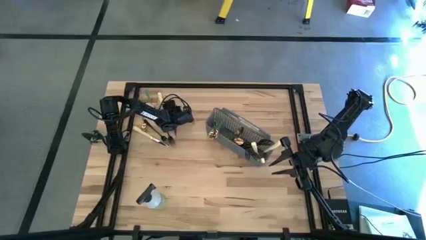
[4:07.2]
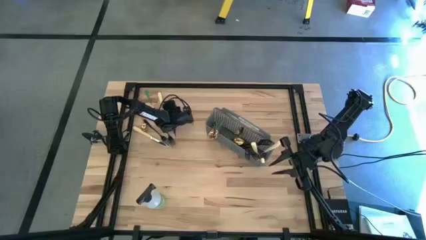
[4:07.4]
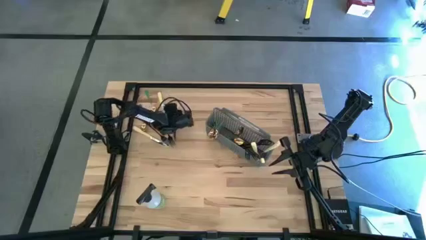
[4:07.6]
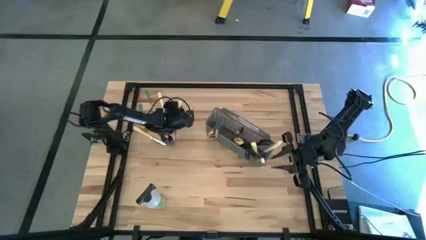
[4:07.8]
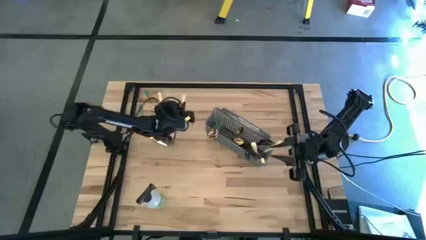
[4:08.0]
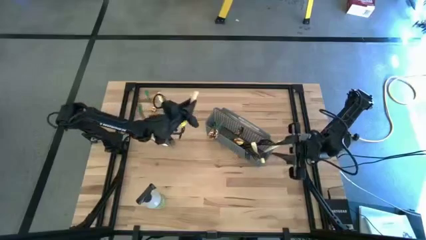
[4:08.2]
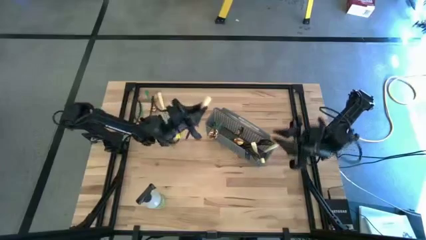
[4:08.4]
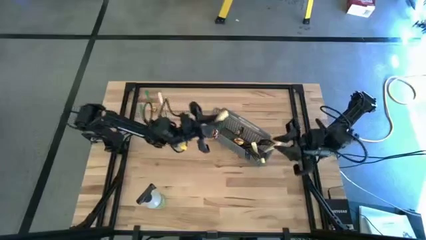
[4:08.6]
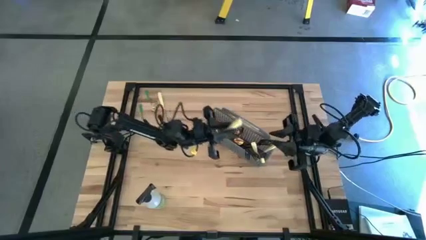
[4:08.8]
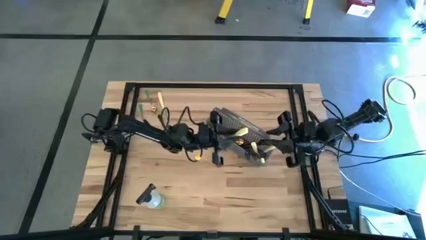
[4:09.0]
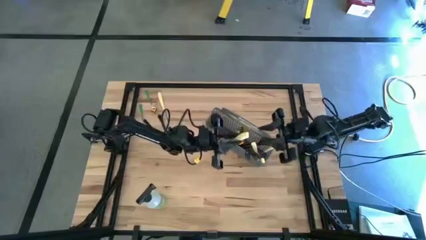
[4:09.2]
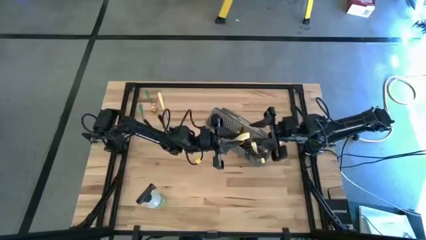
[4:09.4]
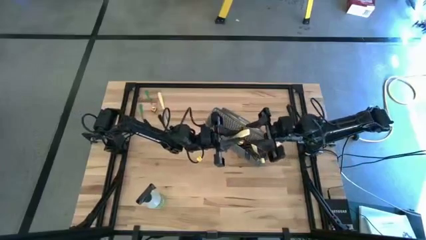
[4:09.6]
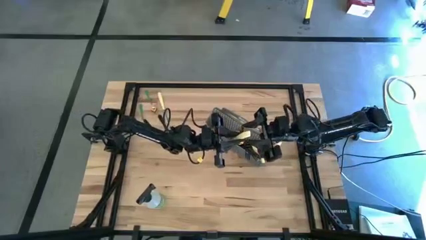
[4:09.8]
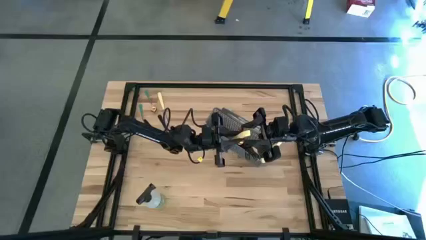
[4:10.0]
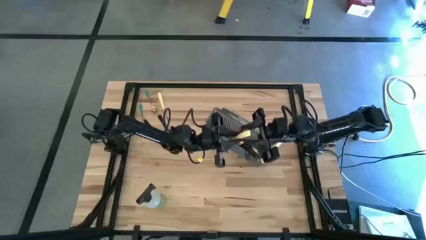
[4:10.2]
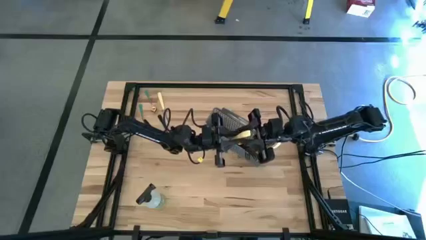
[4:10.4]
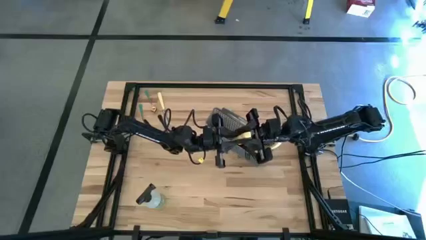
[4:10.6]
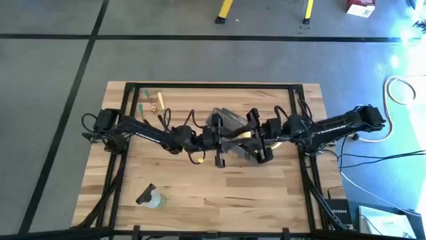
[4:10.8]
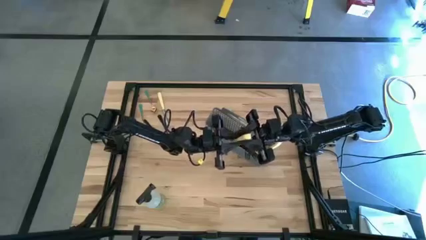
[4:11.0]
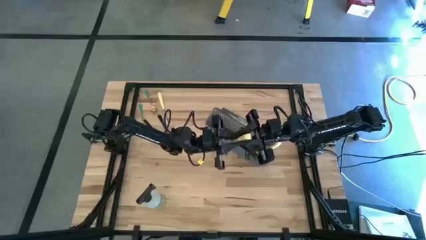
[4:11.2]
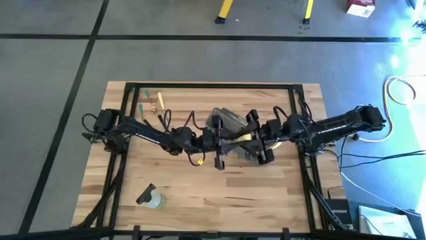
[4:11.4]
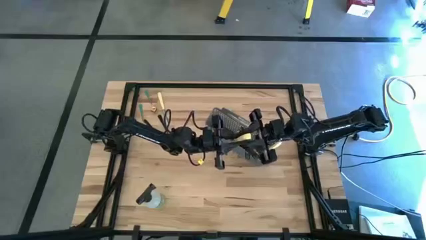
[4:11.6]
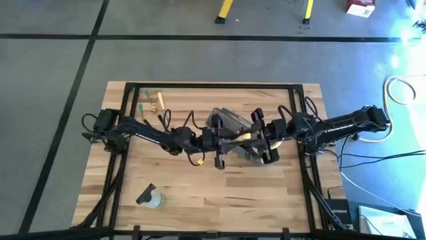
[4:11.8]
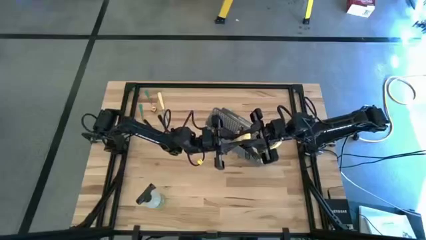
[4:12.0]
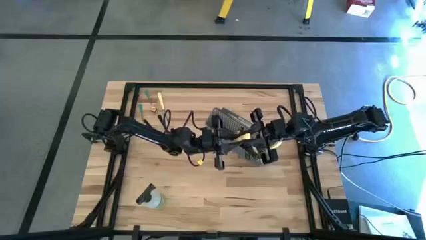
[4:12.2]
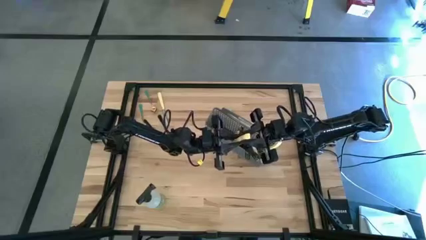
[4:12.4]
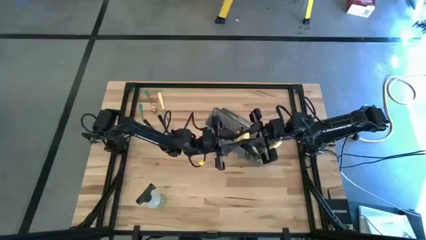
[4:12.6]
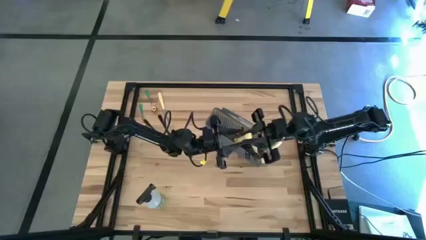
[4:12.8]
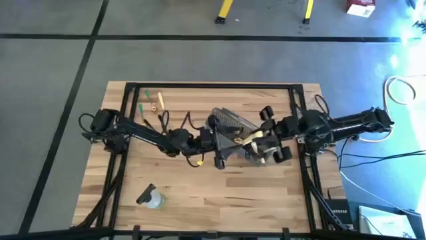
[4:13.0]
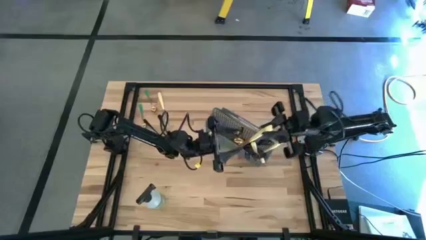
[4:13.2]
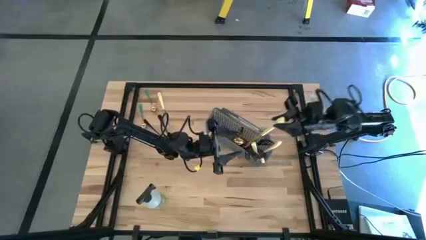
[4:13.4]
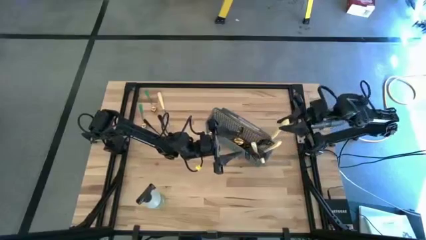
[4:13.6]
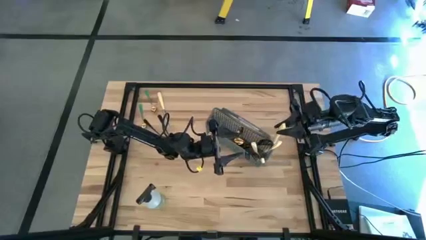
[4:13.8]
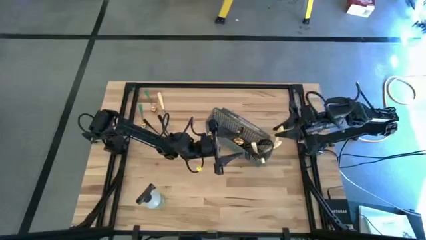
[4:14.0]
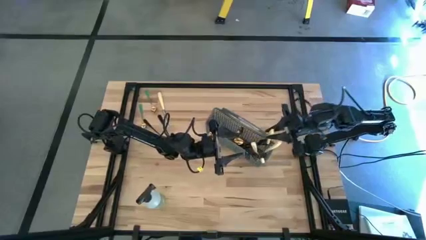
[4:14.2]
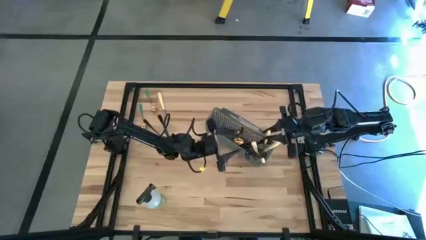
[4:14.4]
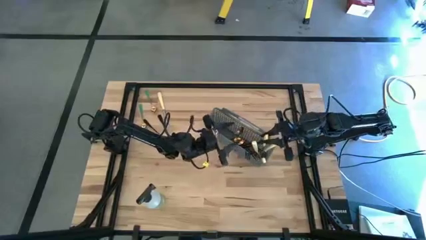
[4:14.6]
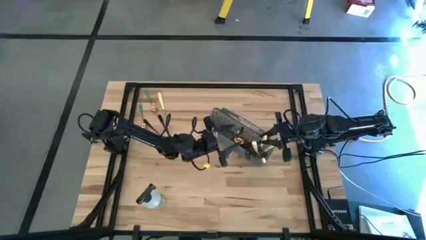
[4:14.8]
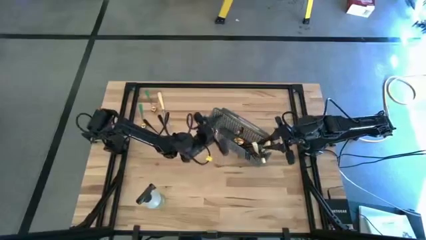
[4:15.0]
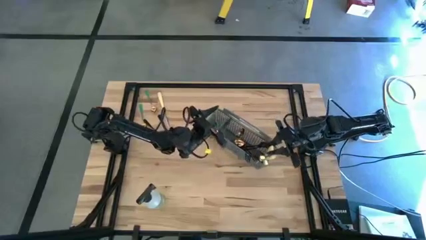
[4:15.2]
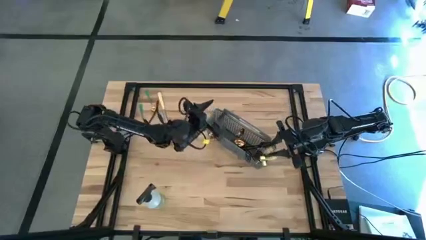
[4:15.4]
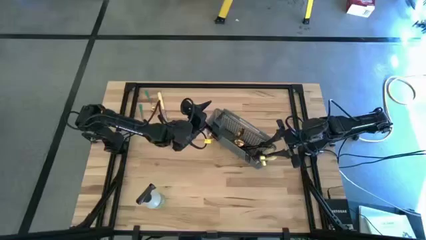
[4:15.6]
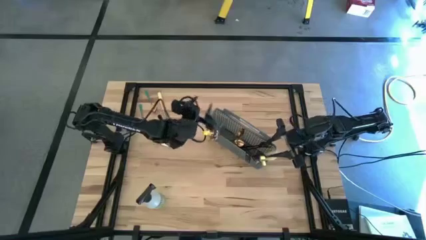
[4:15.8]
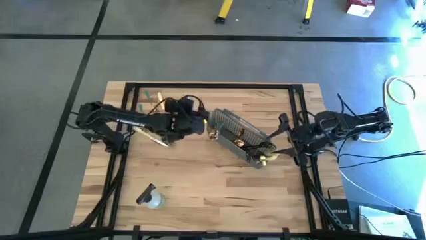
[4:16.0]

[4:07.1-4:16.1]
Task: Sort silverware
Put the silver knife into the cutlery rack

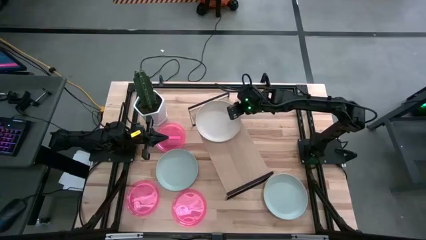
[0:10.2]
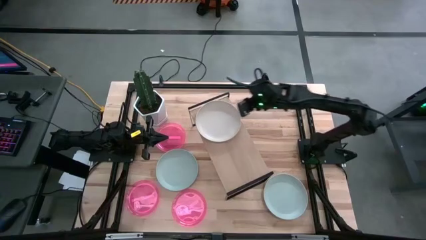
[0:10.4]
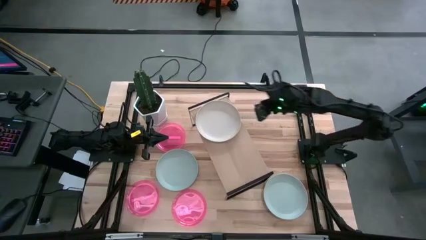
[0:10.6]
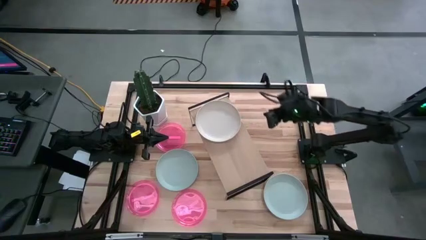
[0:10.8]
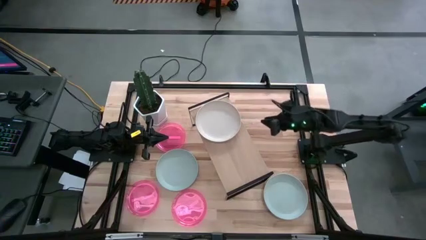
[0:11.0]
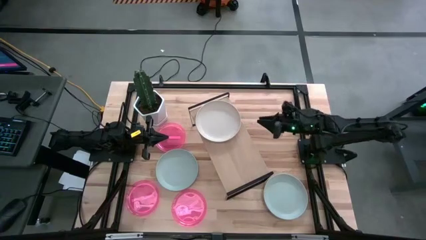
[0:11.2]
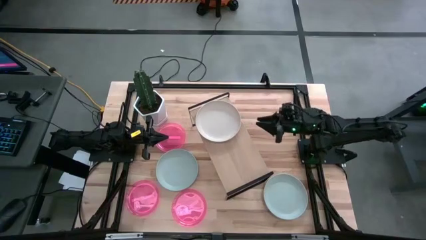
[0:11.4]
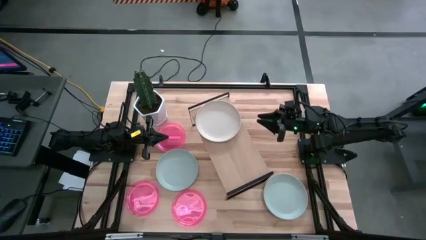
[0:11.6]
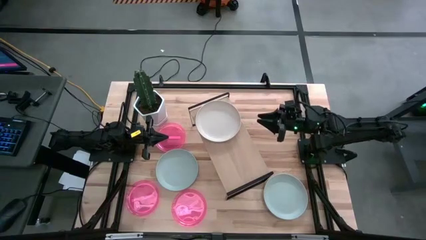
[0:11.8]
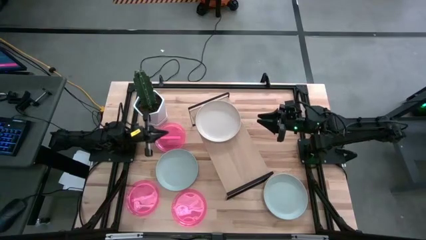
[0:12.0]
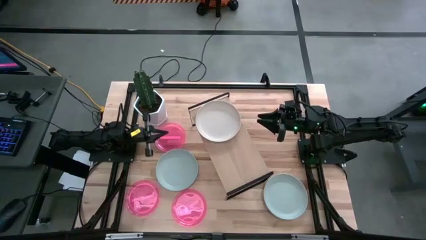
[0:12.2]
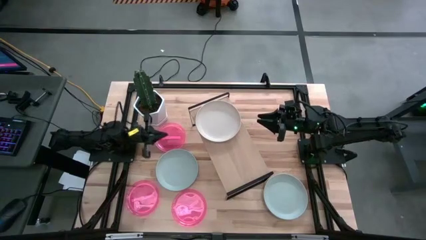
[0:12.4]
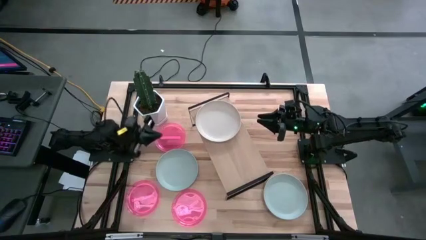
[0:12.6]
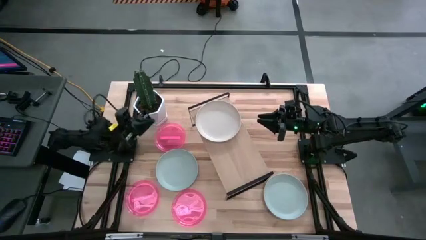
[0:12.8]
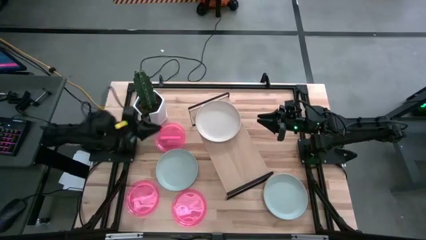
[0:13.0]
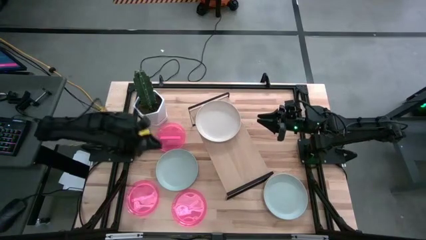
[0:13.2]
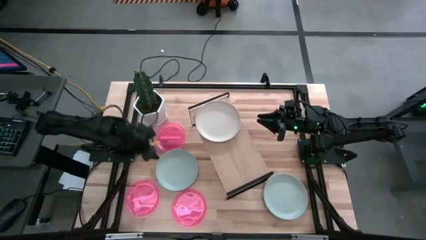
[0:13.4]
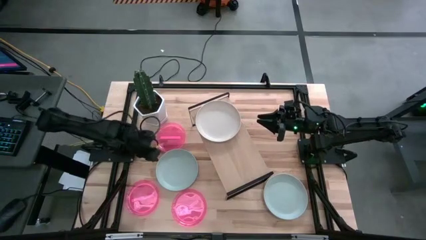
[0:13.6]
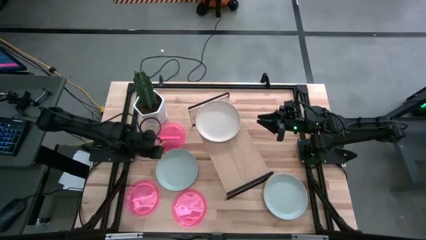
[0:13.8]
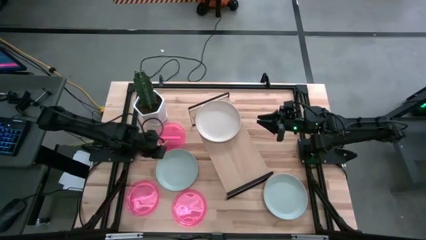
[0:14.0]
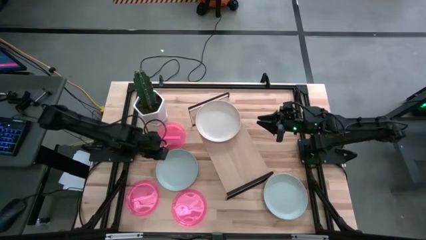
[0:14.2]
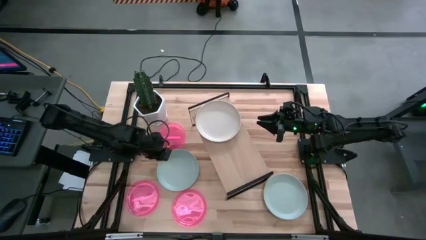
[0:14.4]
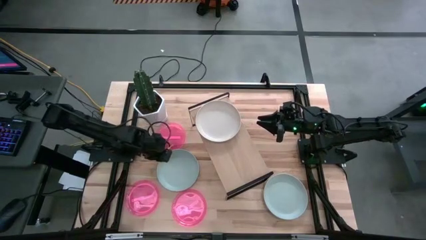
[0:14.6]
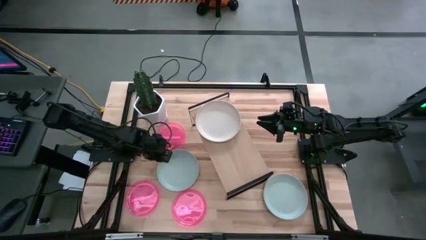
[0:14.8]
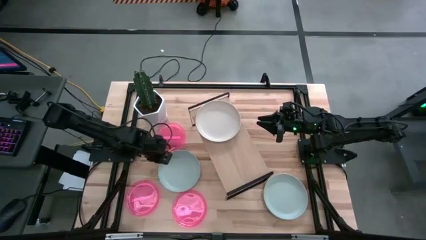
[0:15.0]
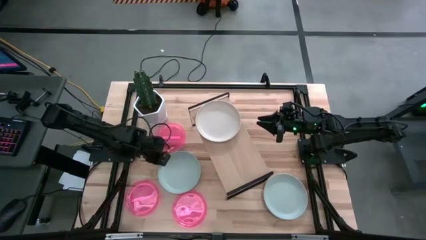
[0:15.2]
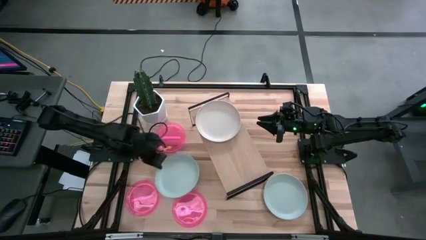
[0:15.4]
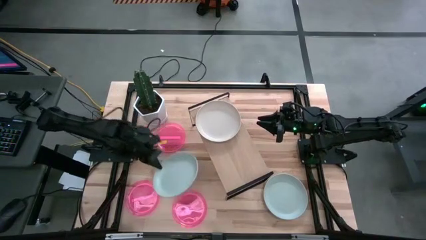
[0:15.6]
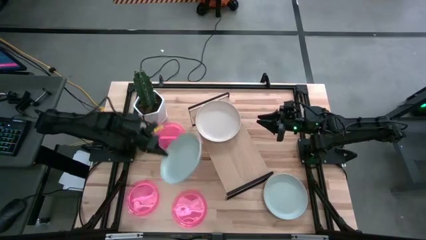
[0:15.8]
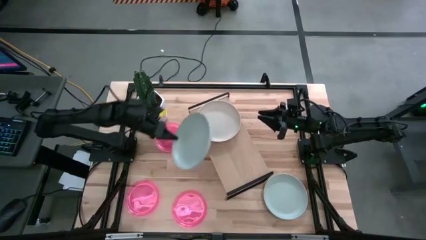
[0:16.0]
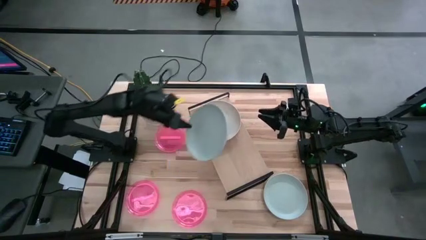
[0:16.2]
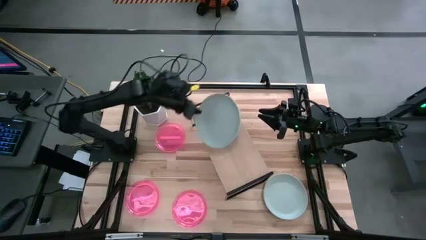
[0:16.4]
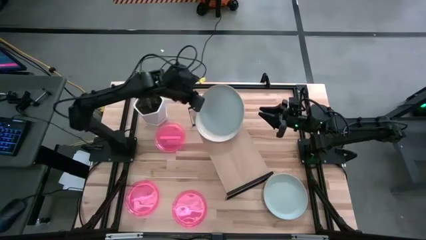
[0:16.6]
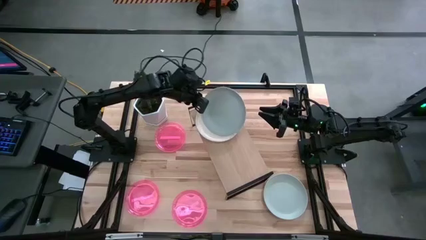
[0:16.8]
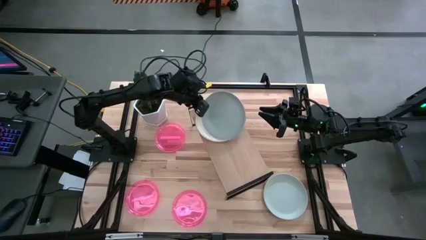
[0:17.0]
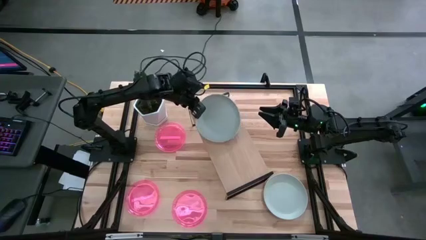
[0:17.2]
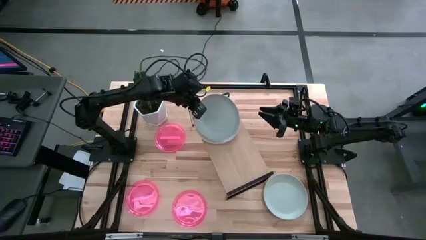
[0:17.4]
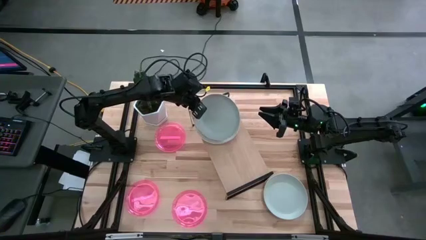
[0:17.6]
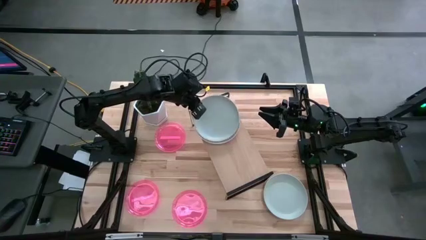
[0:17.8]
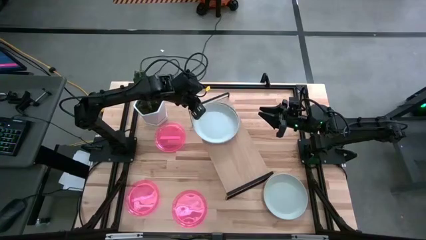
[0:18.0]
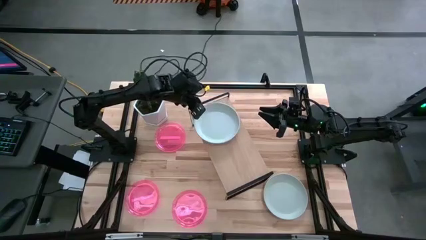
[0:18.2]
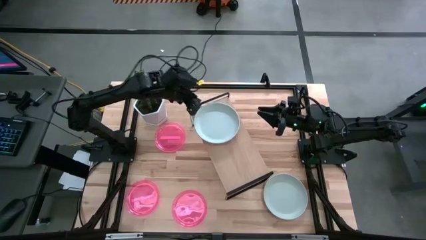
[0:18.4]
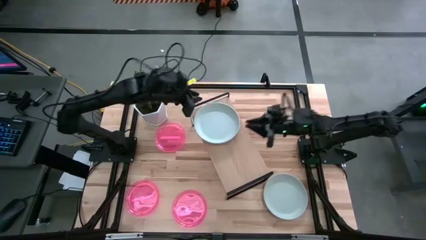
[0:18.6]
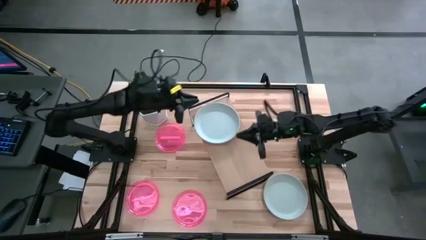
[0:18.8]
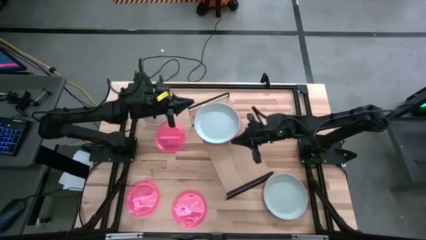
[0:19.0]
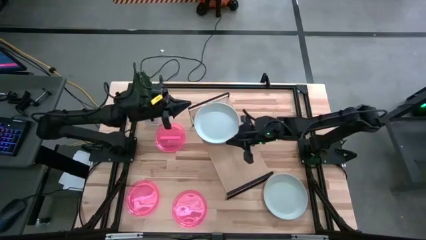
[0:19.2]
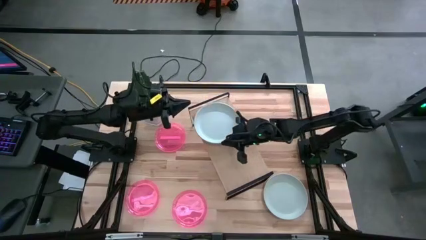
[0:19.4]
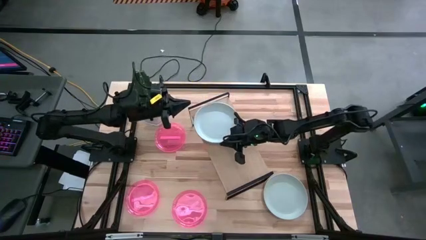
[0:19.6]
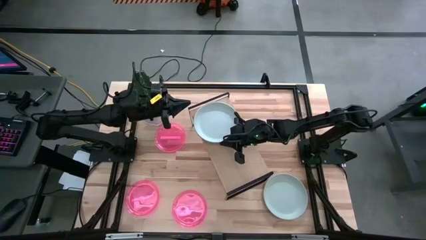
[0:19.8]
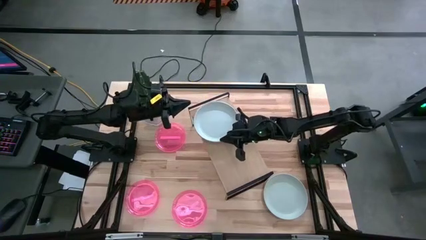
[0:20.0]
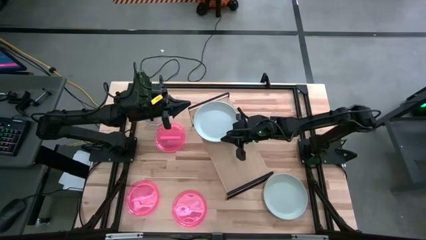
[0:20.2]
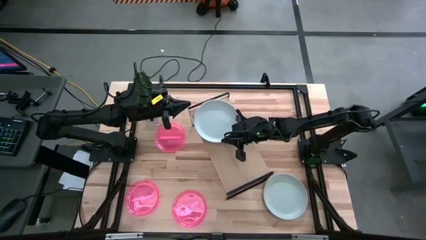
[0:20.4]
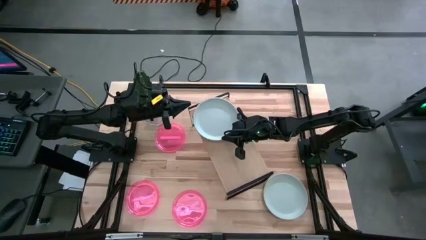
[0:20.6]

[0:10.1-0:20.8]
Task: Place and stack plates onto a shelf
Stack the left gray plate on top of the white plate on the shelf
